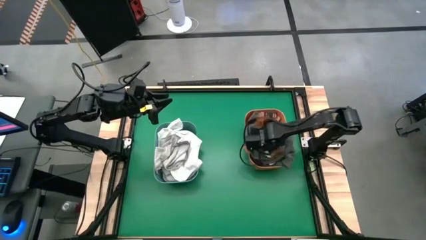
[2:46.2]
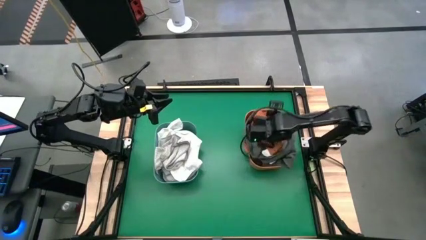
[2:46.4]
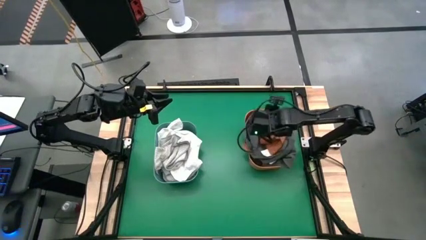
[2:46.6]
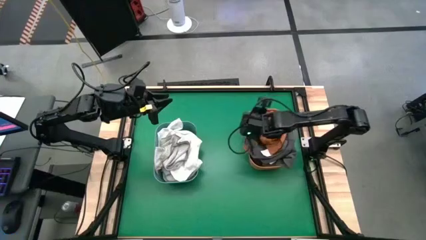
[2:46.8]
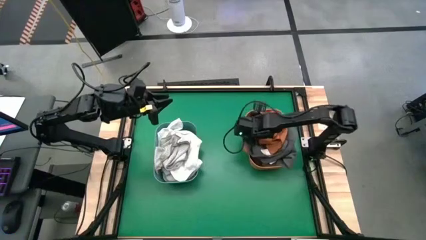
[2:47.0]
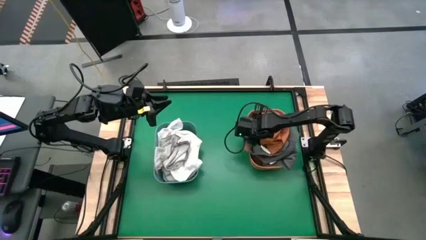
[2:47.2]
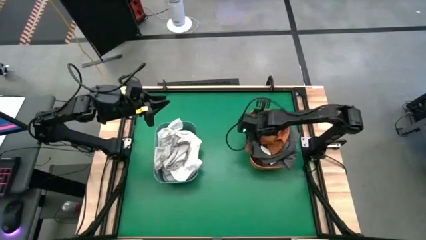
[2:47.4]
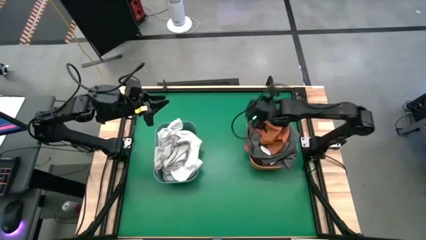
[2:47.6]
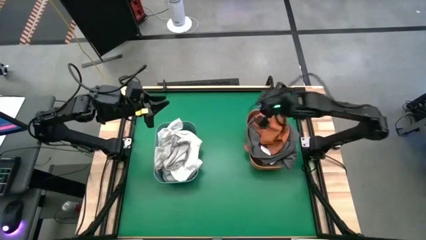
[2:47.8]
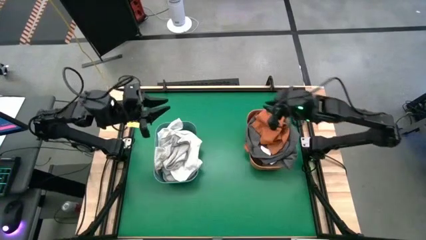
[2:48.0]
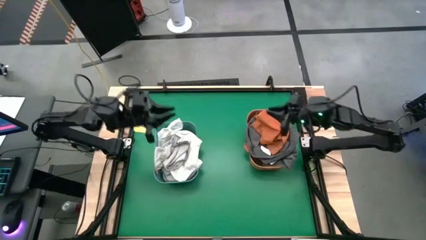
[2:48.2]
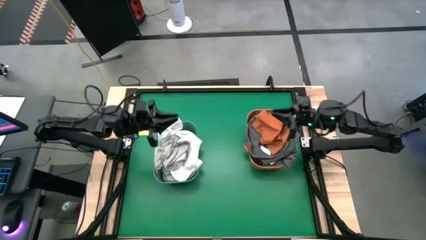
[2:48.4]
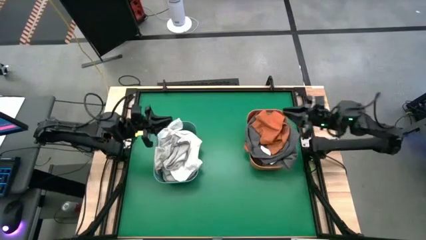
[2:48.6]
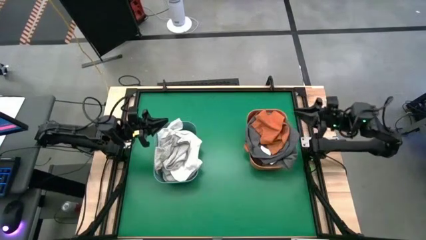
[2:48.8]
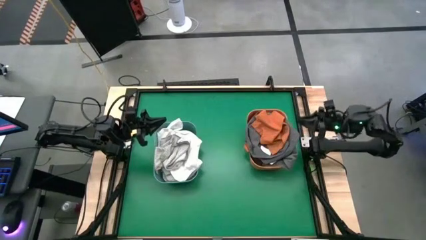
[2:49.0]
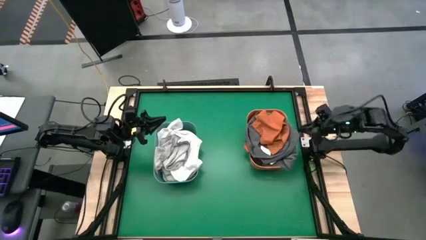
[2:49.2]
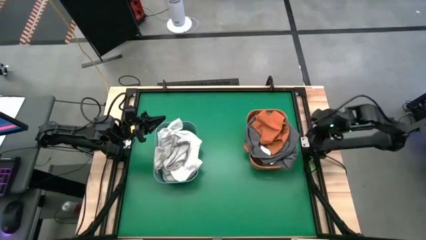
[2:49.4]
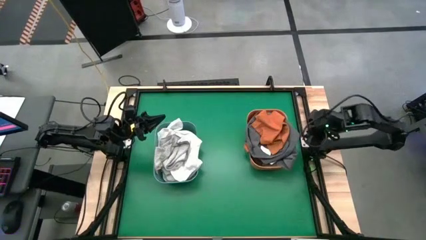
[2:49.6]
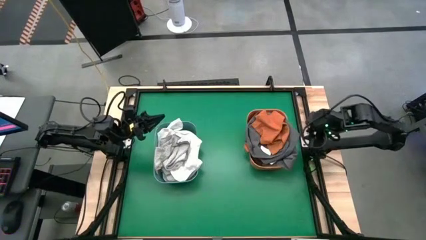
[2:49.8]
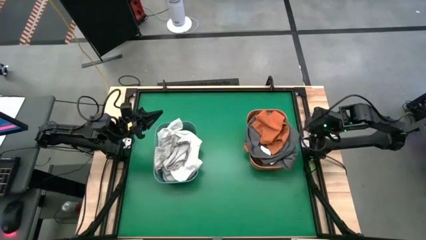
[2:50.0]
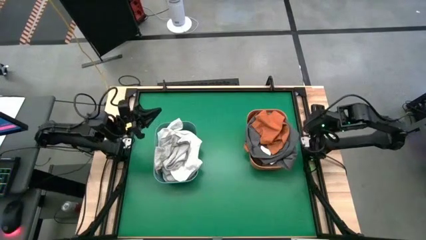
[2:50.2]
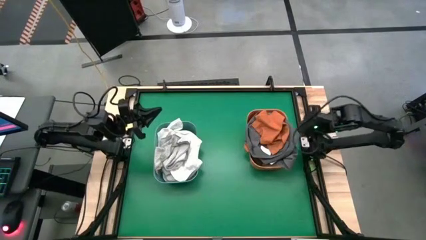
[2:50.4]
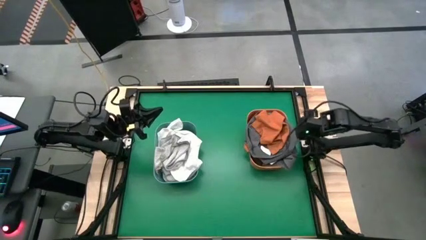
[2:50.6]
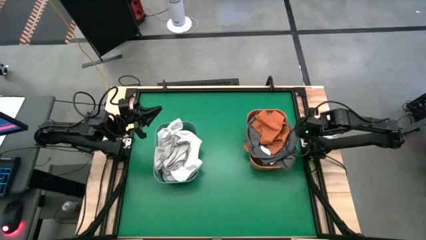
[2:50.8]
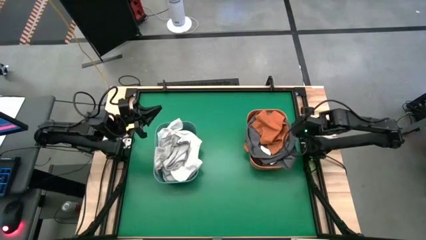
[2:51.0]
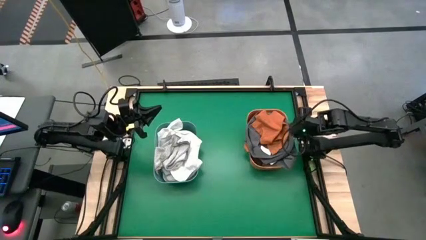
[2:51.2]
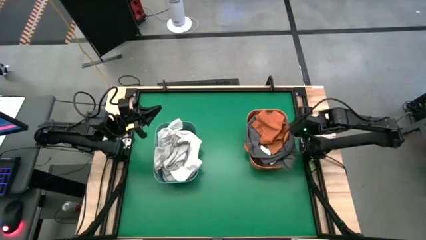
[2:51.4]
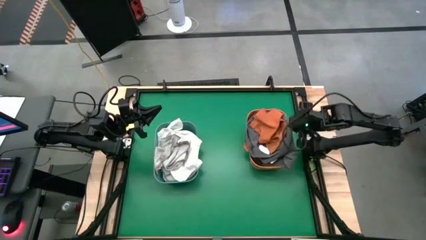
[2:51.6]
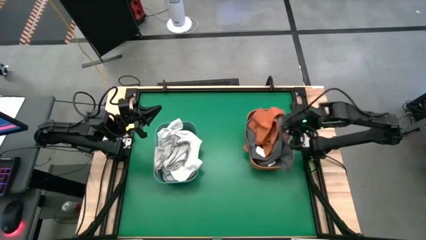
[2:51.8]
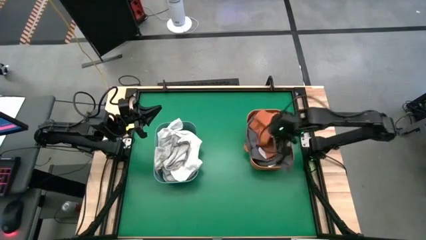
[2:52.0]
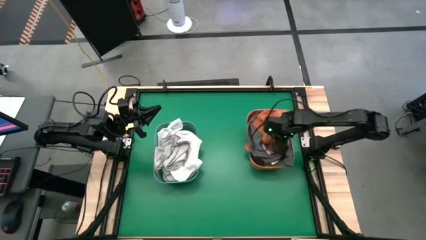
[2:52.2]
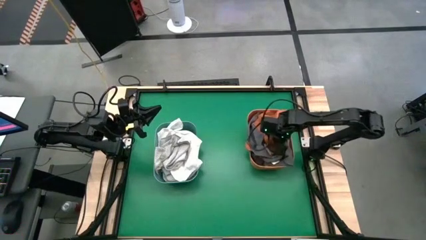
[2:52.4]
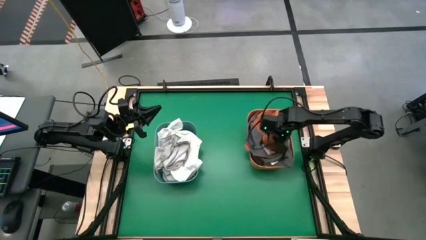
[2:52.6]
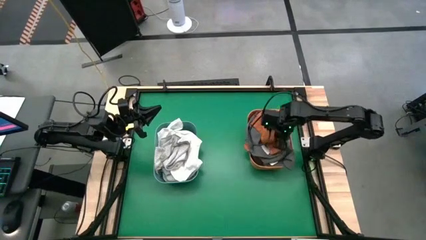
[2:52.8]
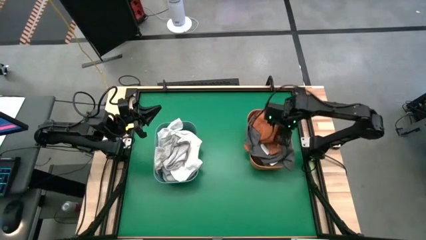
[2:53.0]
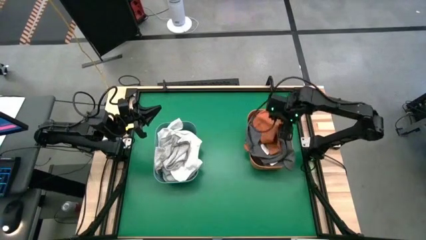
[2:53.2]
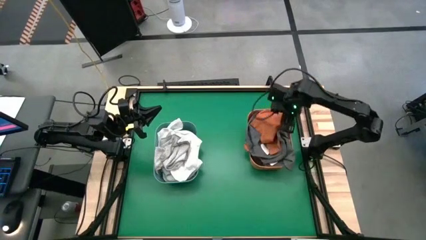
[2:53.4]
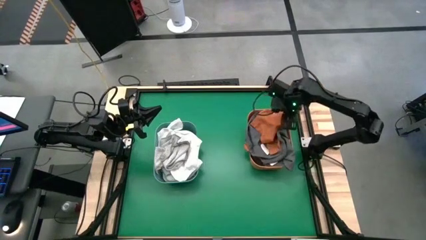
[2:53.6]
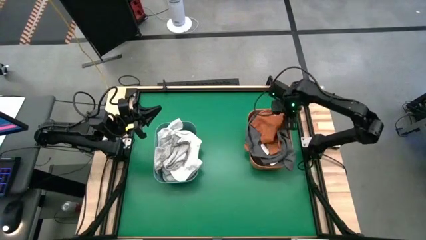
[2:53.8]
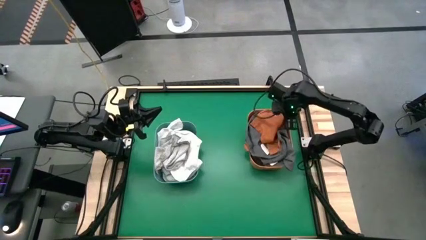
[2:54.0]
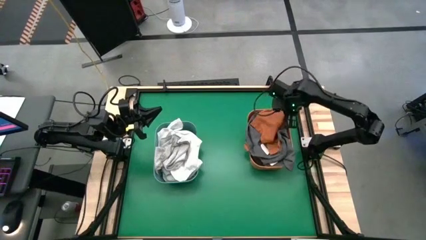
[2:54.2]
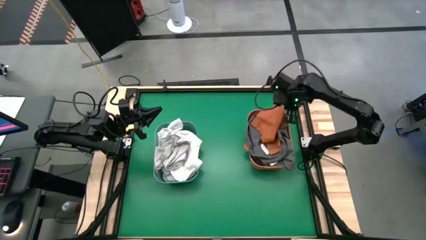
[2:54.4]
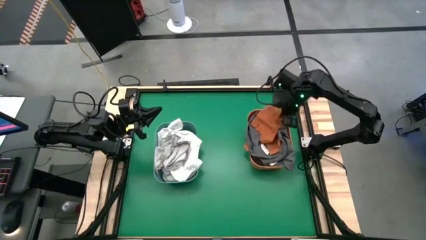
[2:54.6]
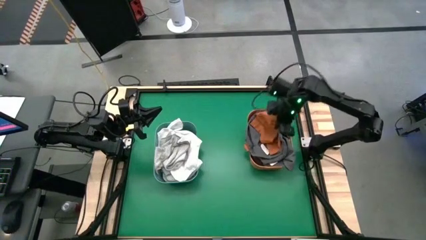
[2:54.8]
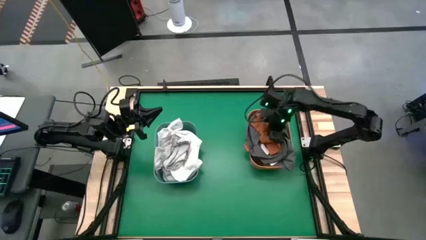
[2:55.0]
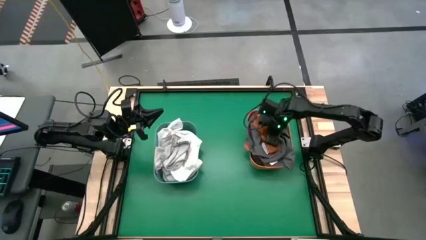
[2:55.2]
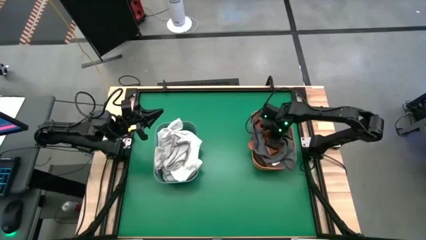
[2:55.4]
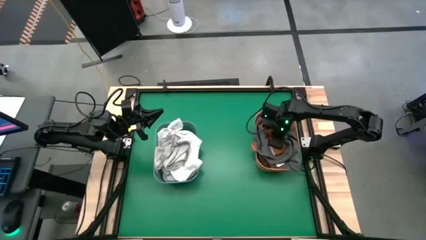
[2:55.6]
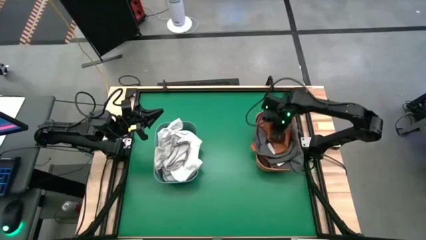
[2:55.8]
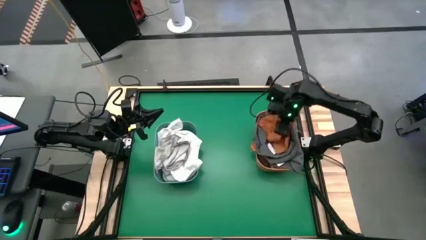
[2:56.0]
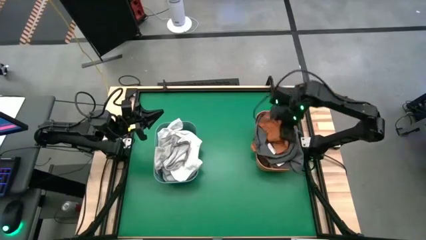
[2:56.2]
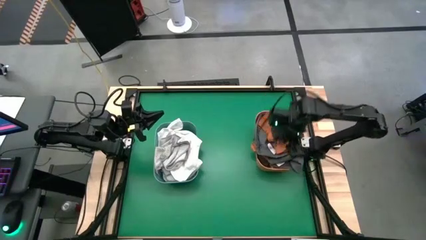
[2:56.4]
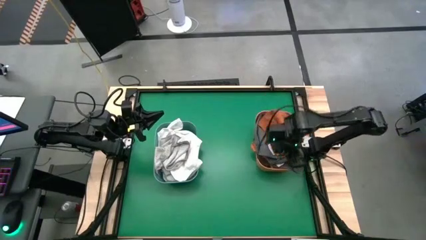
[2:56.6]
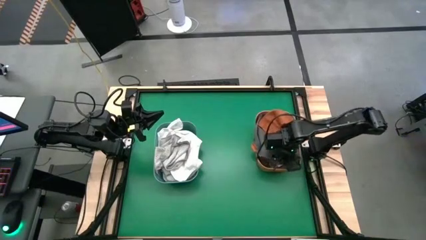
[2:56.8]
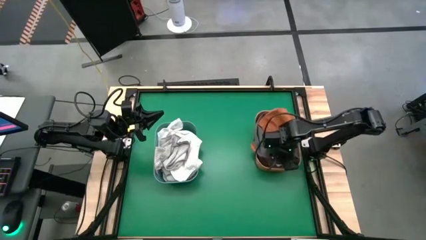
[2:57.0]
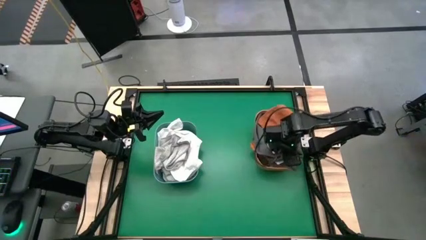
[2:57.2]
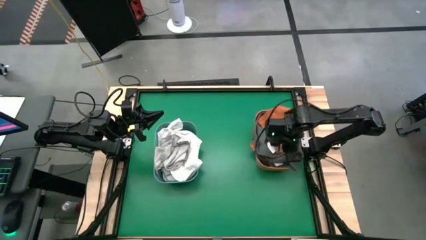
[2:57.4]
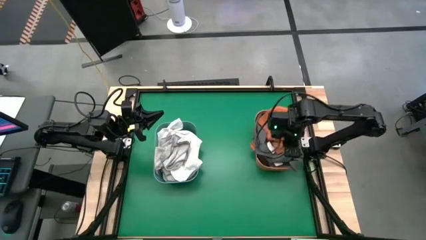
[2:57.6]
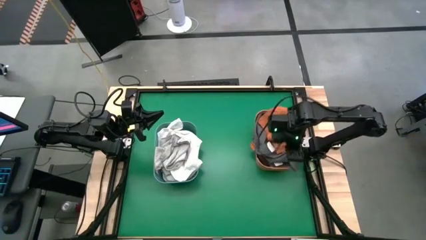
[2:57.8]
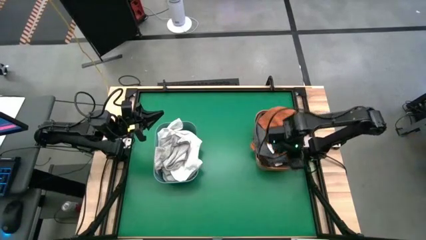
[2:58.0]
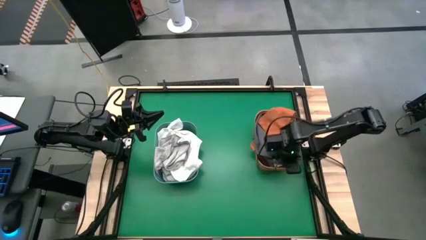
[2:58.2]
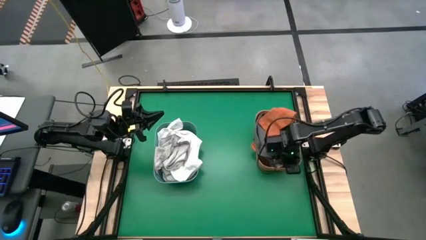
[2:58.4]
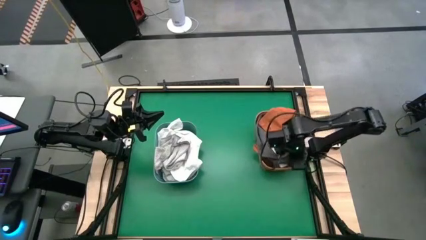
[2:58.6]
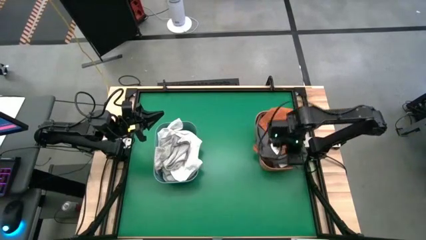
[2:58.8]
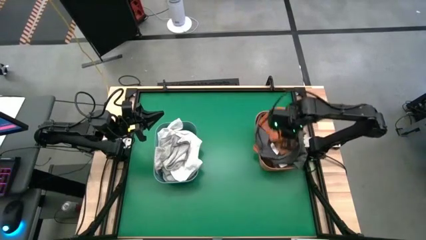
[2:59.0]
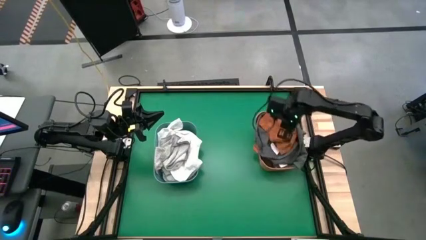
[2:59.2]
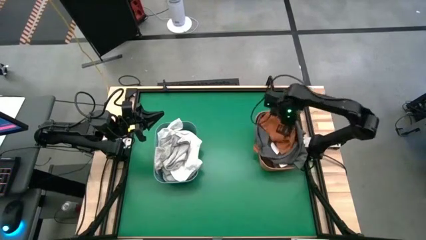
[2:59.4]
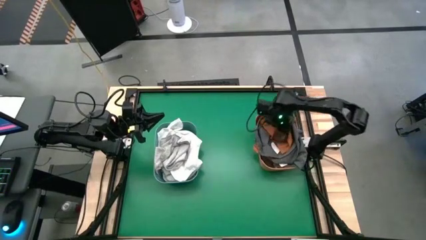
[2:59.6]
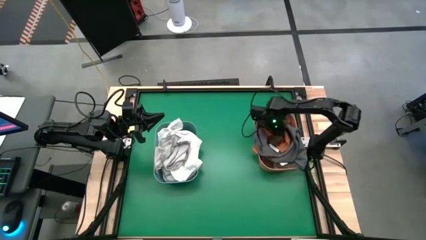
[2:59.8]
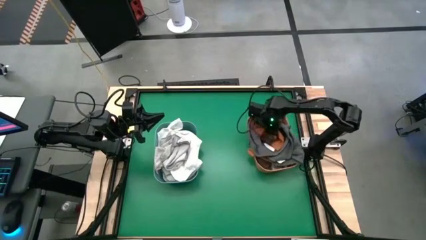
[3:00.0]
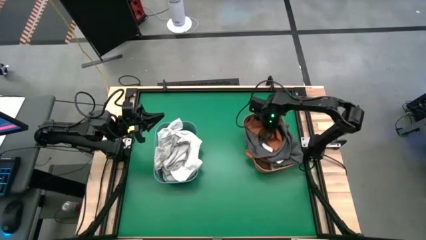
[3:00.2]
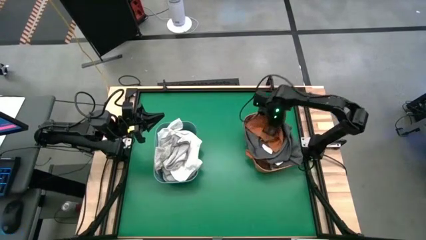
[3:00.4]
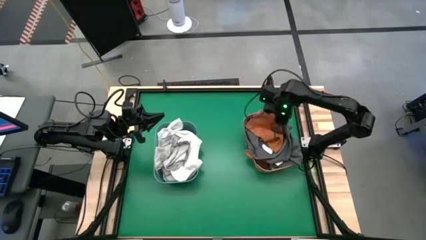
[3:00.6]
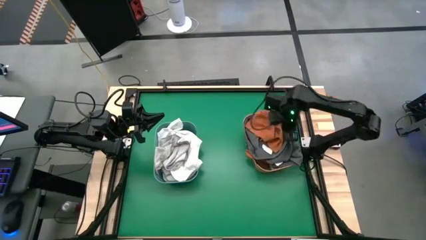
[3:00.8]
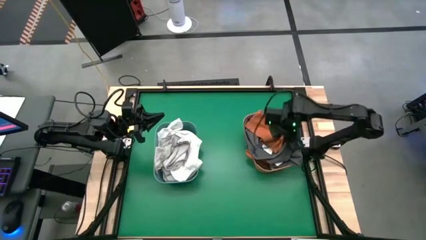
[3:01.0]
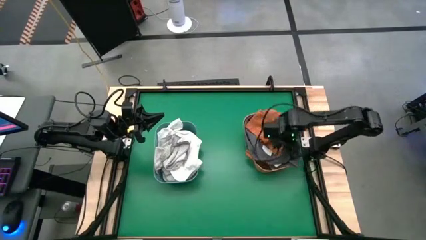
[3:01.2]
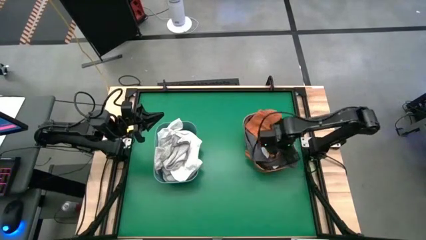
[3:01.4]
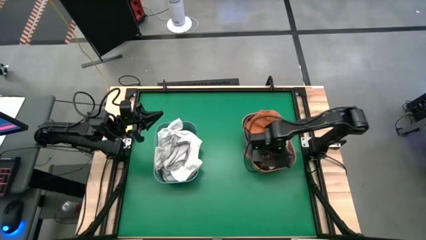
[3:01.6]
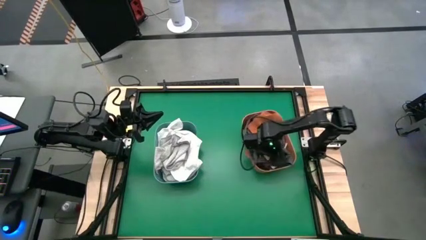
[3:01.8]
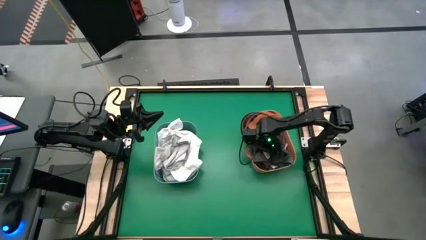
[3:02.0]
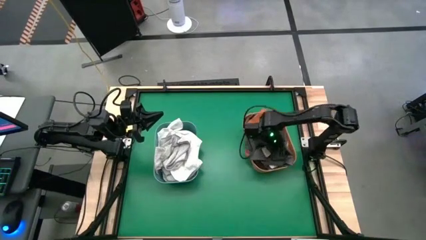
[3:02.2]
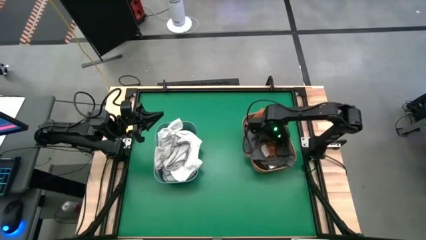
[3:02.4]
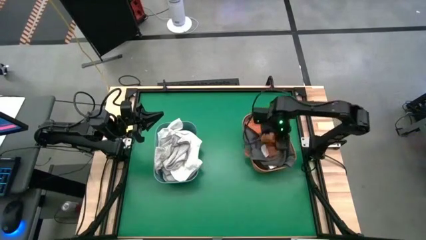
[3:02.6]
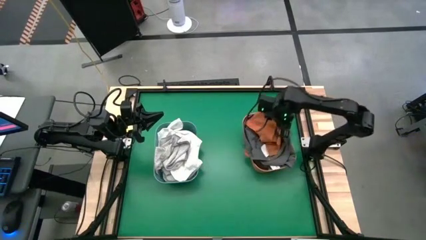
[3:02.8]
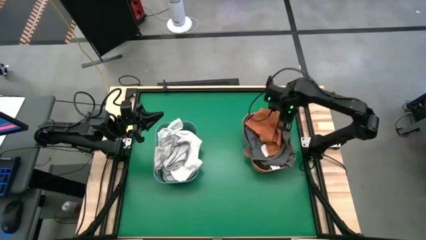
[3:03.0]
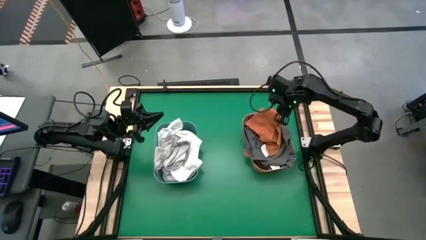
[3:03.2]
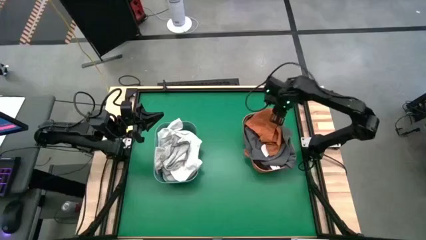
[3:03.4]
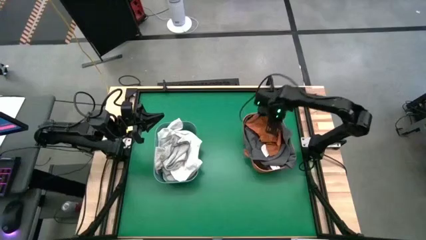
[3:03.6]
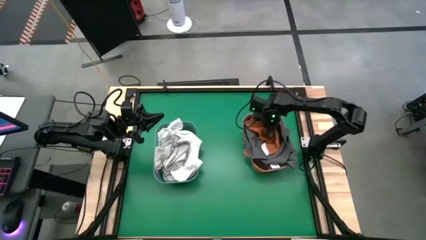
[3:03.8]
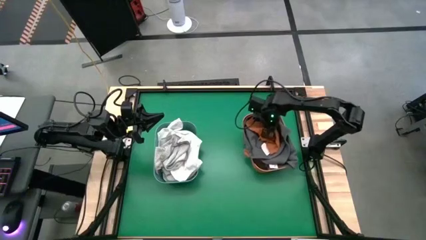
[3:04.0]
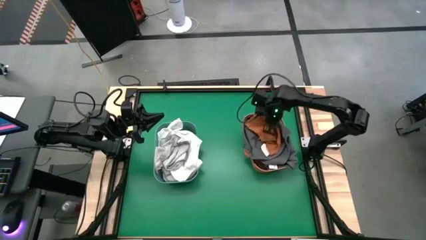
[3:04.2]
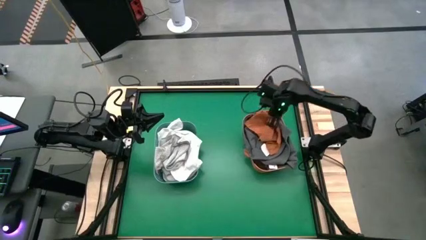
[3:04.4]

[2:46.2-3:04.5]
Task: Sort towels by color in basket
Put the orange towel into the orange bin
